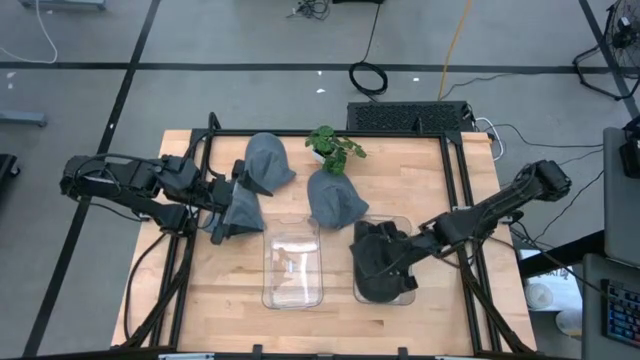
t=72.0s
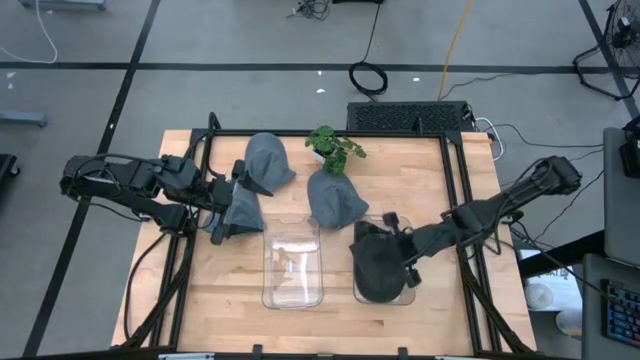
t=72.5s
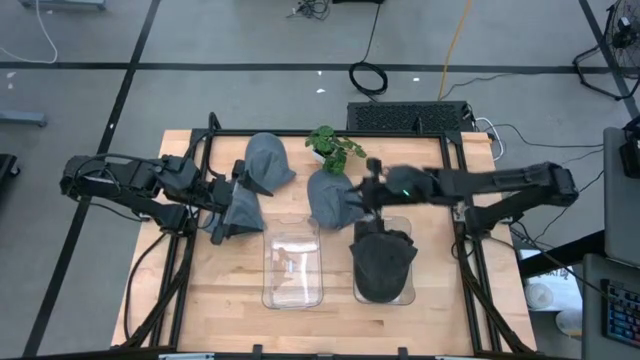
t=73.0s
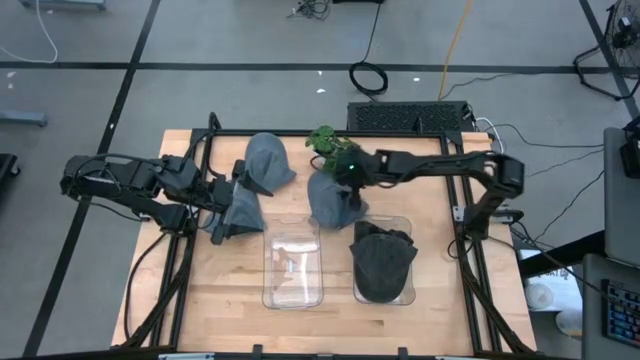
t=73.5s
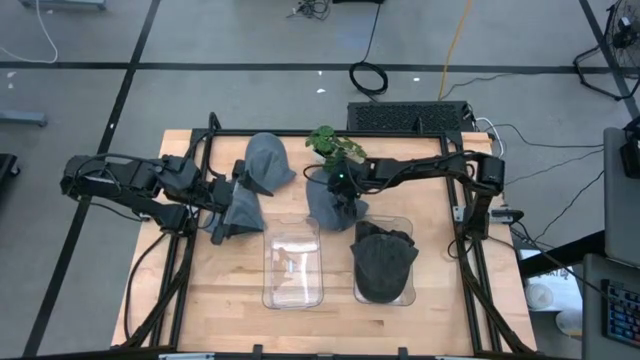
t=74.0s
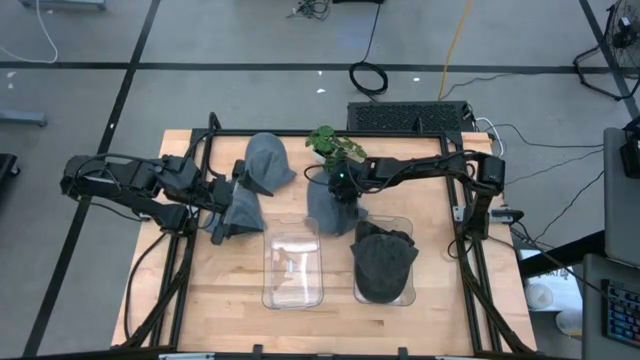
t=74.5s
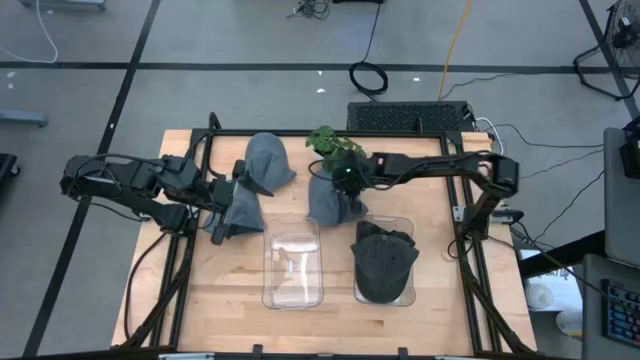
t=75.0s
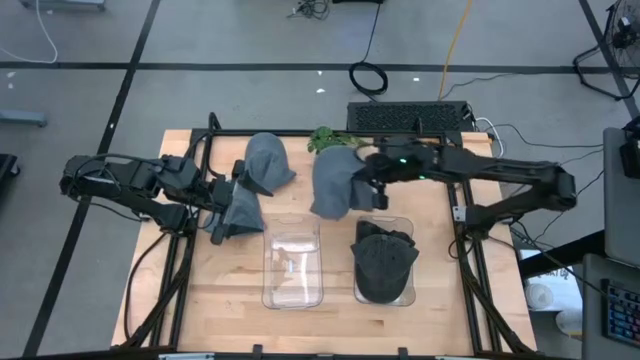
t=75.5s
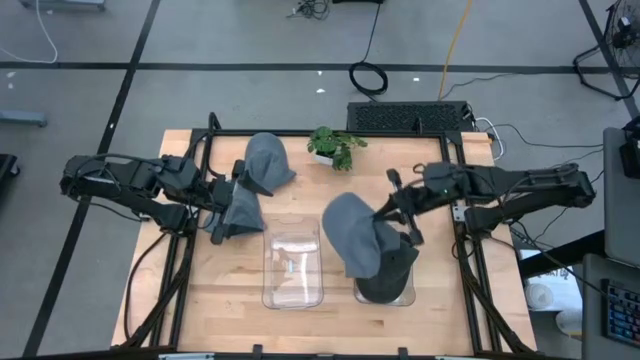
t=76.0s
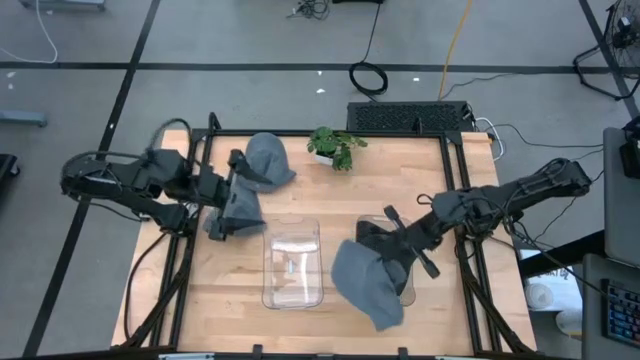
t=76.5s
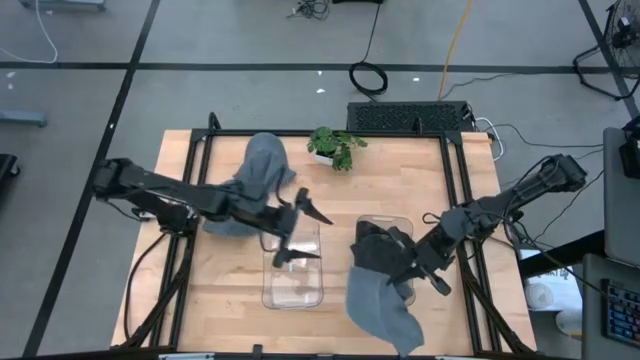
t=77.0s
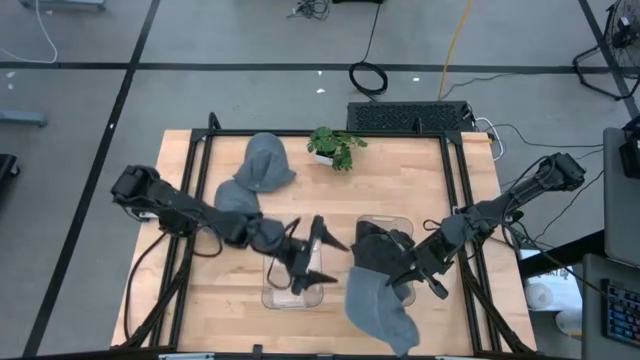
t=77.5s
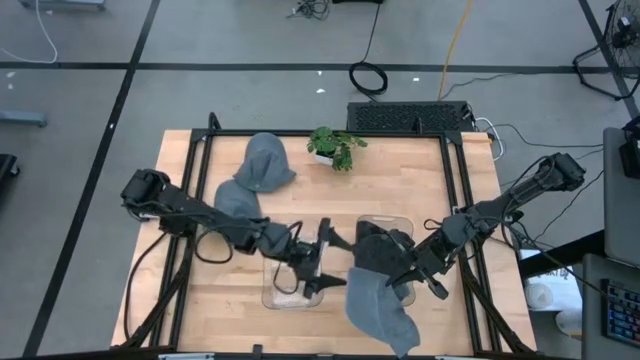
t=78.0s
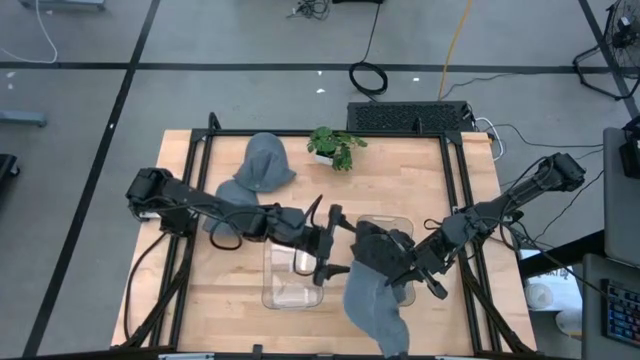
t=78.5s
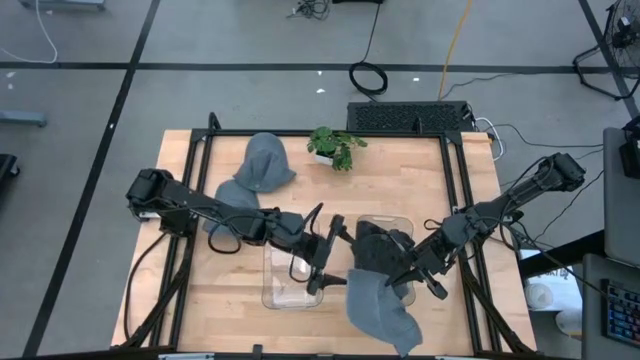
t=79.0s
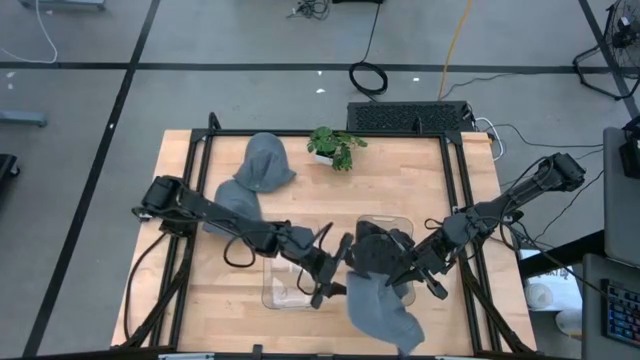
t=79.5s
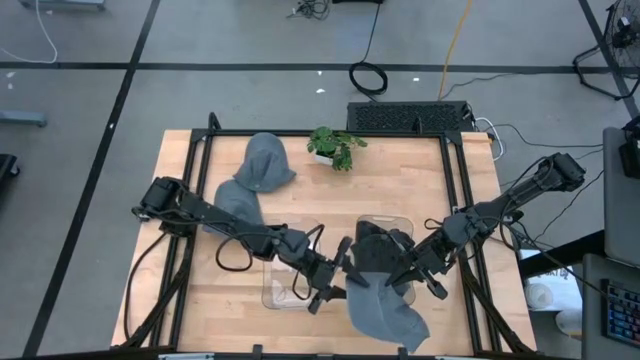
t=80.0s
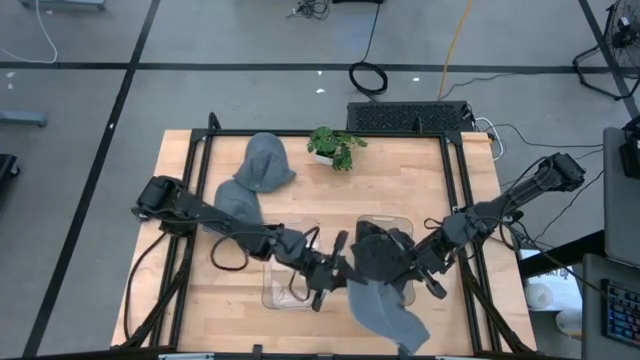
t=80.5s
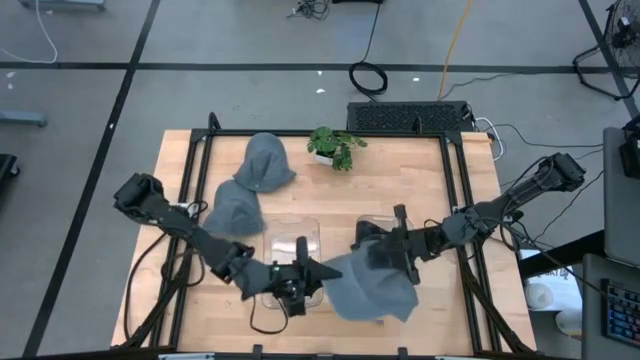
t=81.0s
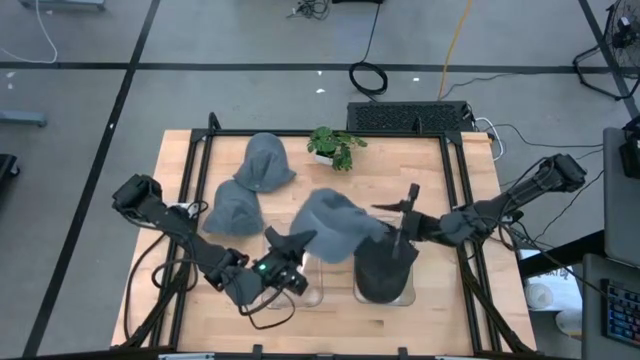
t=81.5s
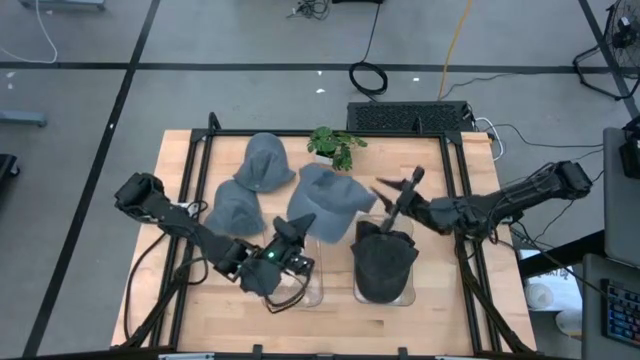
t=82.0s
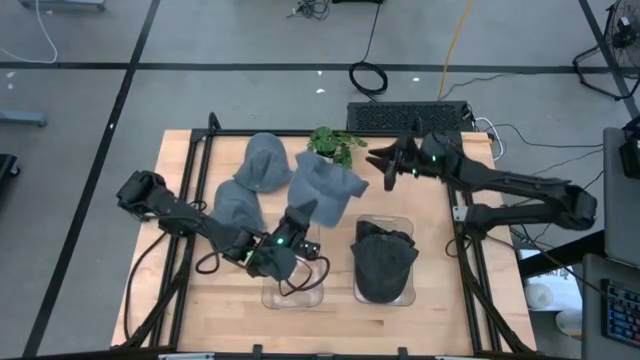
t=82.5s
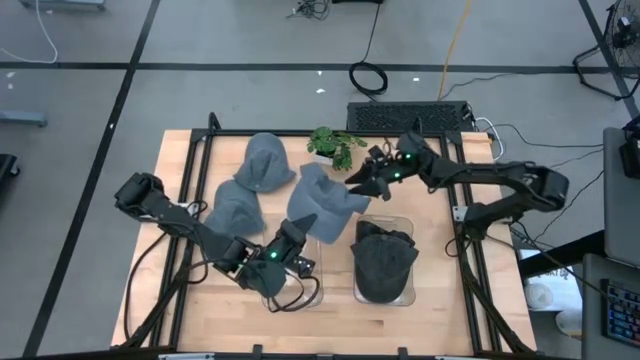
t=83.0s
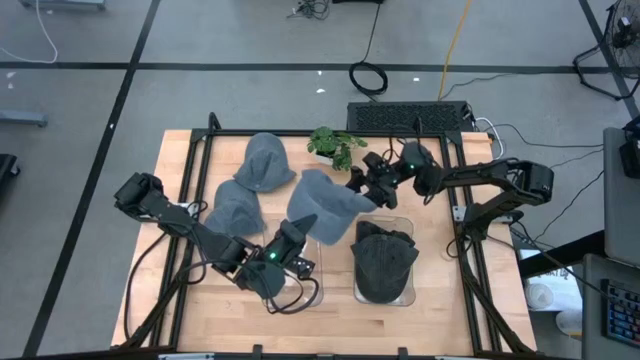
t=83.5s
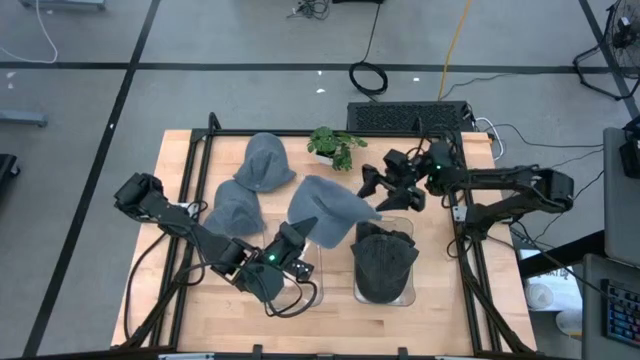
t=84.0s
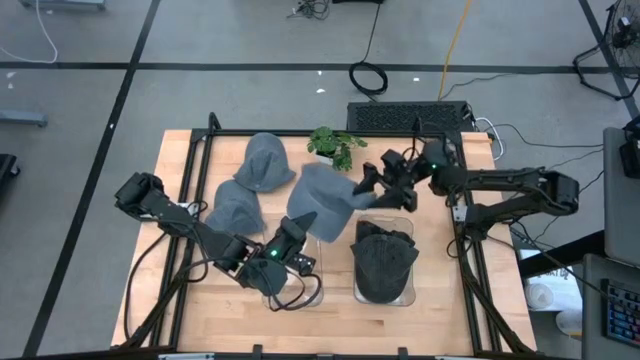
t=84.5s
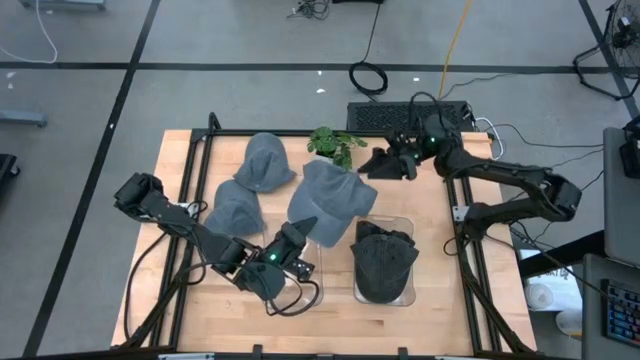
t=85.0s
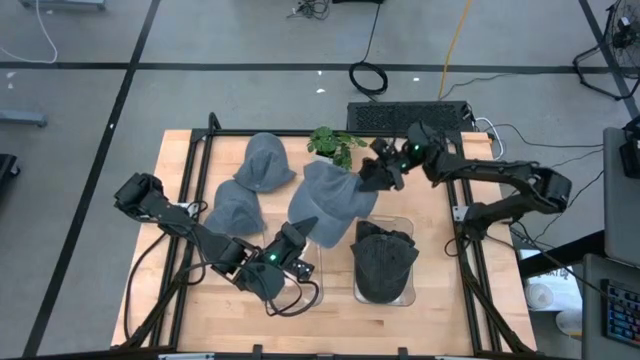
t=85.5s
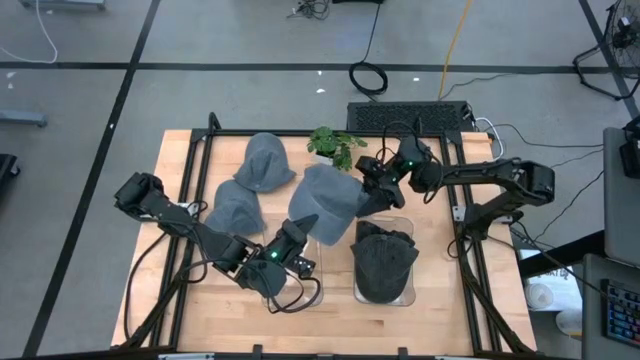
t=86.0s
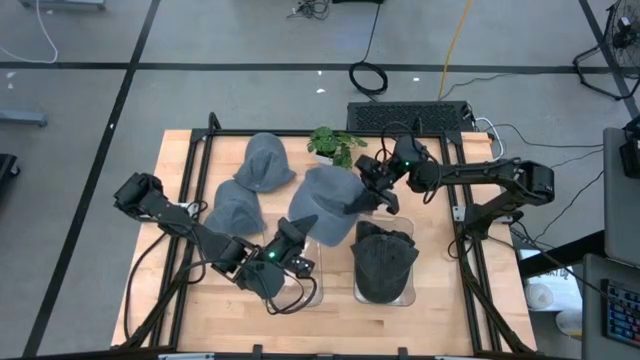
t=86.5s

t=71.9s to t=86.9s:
Task: Pick & Place hat
Put the bottom right gray cap into the left transparent bin

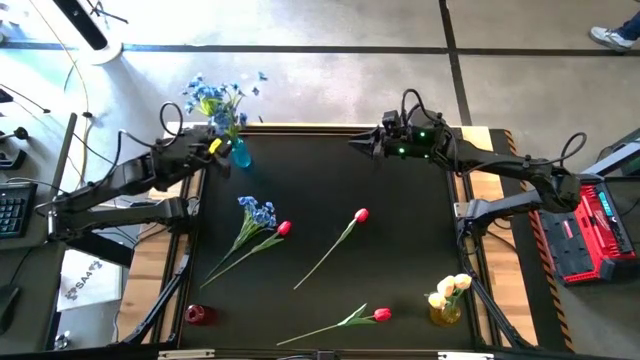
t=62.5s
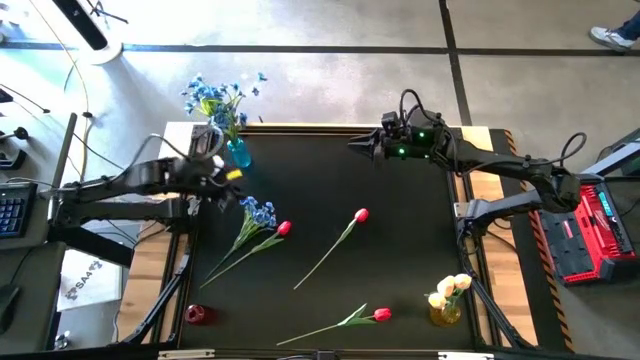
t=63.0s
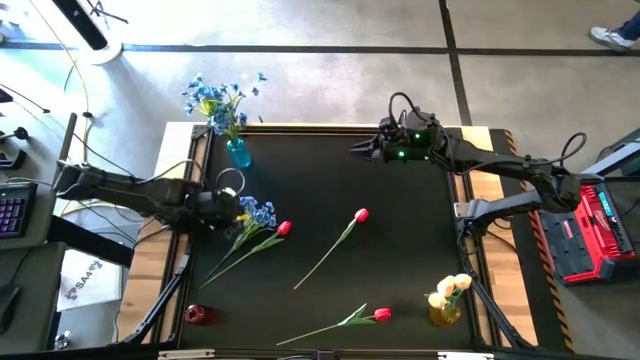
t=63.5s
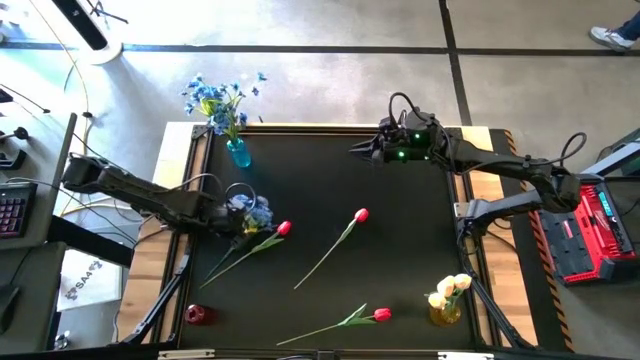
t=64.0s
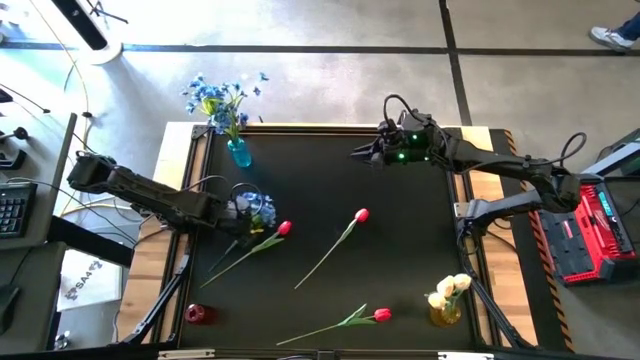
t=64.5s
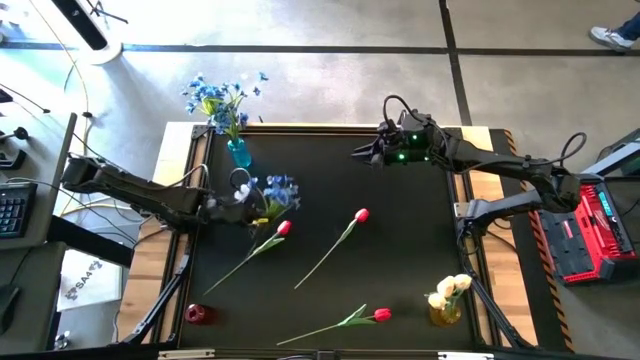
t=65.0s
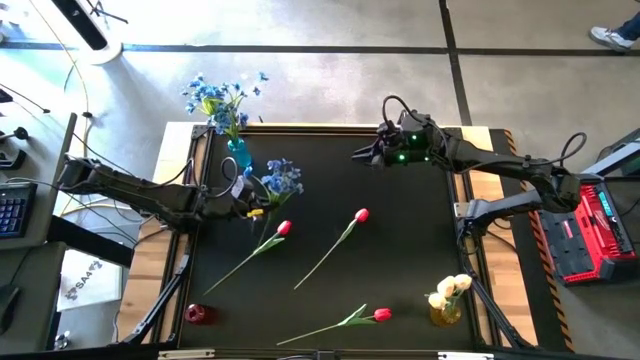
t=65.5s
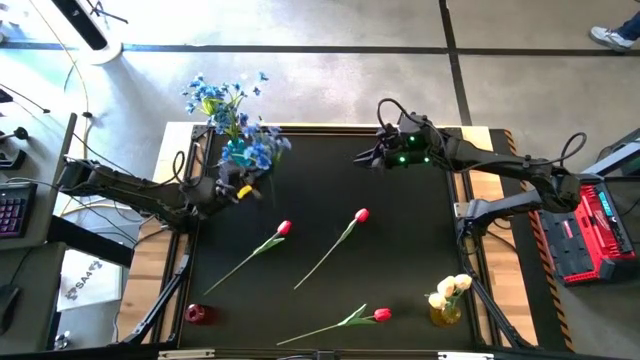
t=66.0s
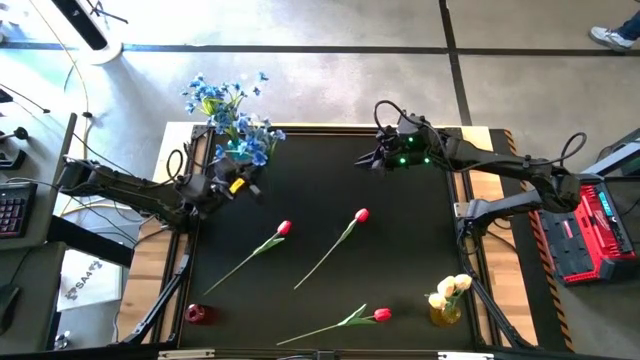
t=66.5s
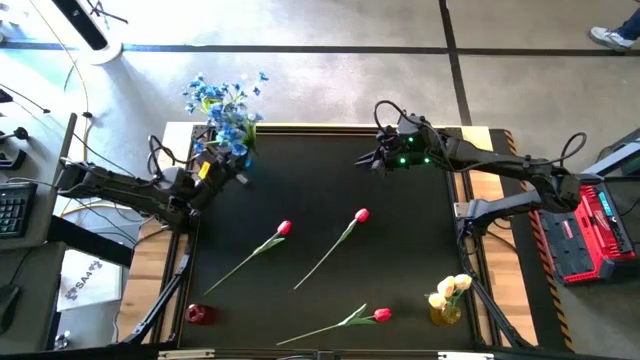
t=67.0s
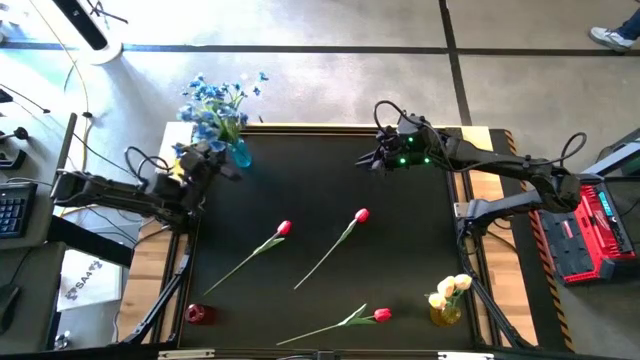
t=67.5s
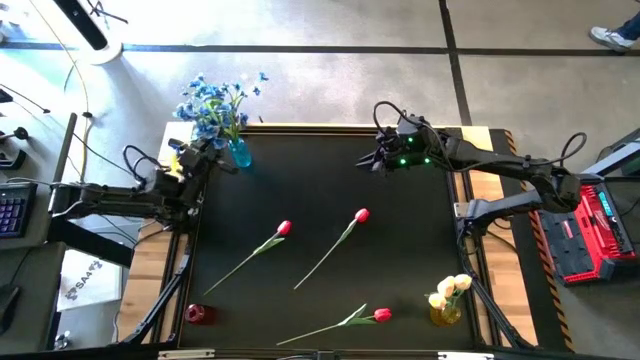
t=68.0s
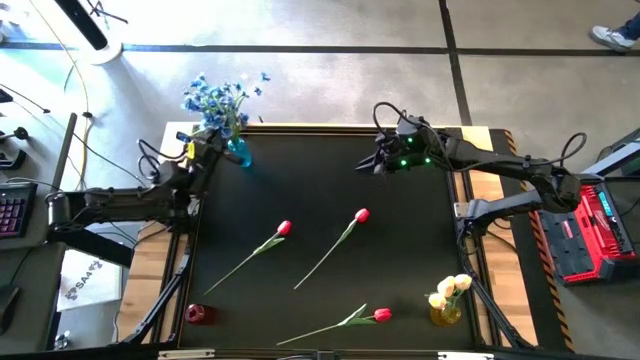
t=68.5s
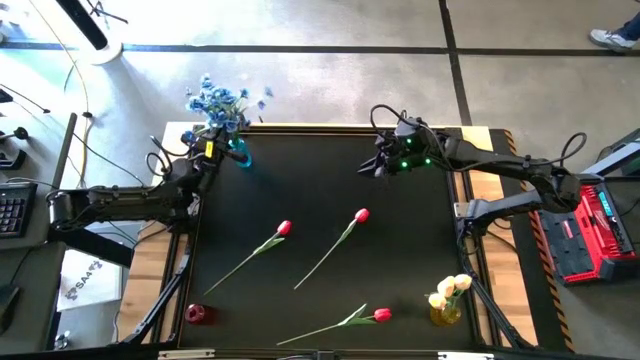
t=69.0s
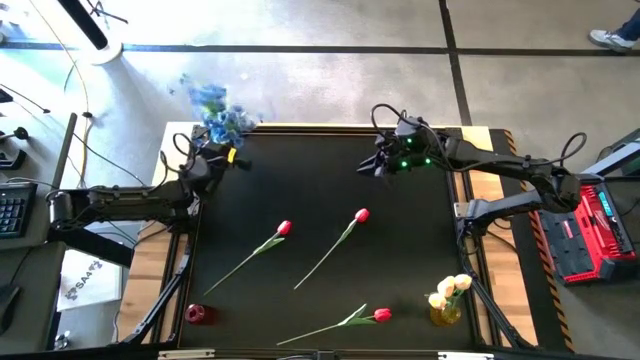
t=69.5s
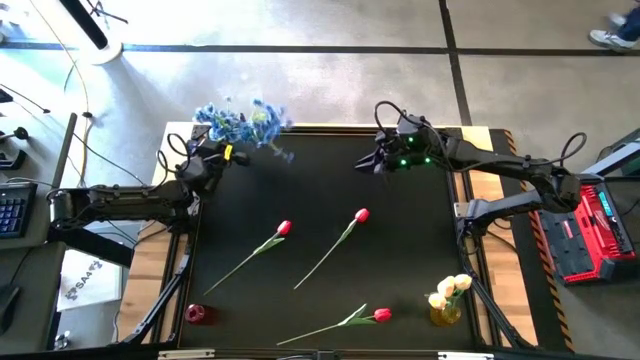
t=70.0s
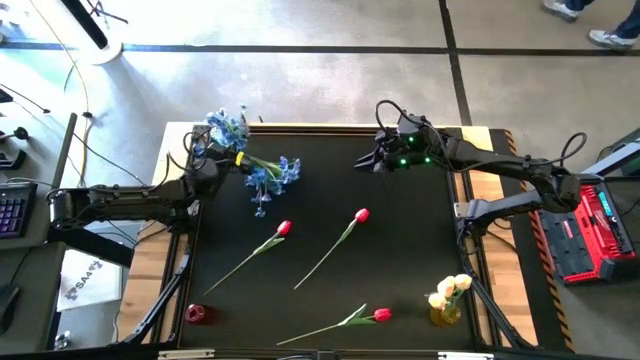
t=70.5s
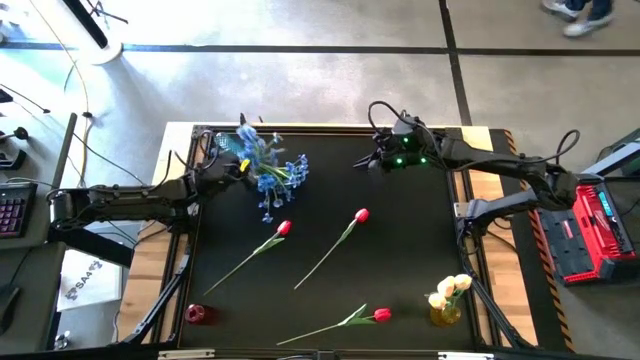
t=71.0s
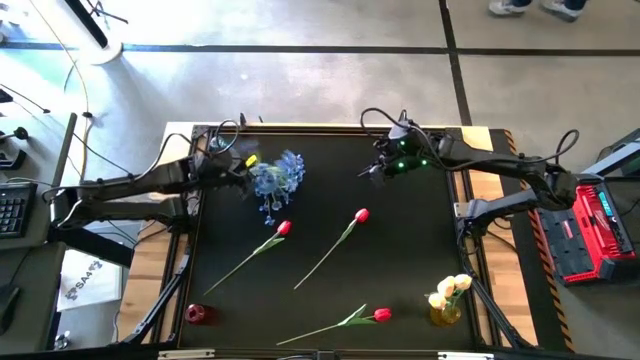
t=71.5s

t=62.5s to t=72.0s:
Task: Sort flowers into vase by color
Put the blue flowers into the blue vase
